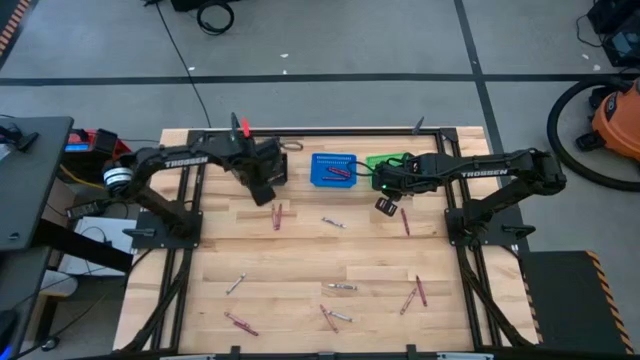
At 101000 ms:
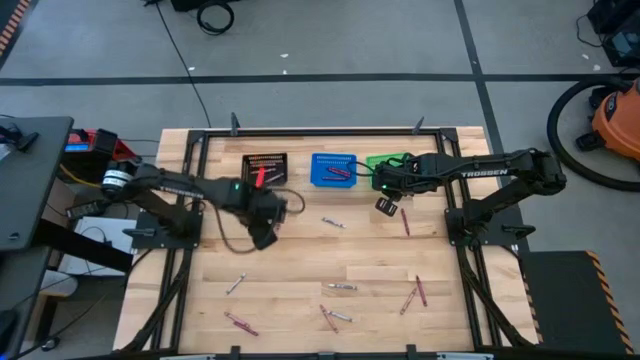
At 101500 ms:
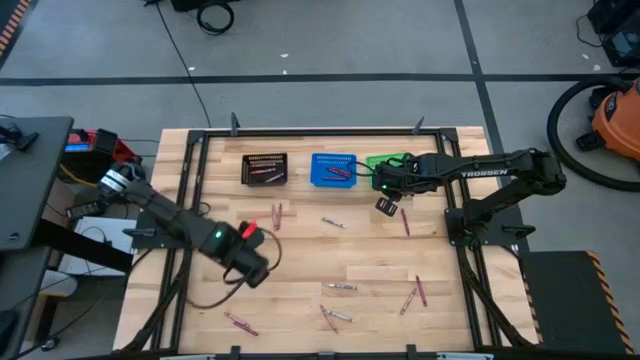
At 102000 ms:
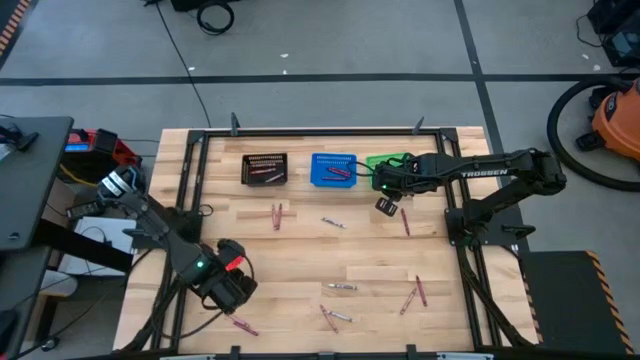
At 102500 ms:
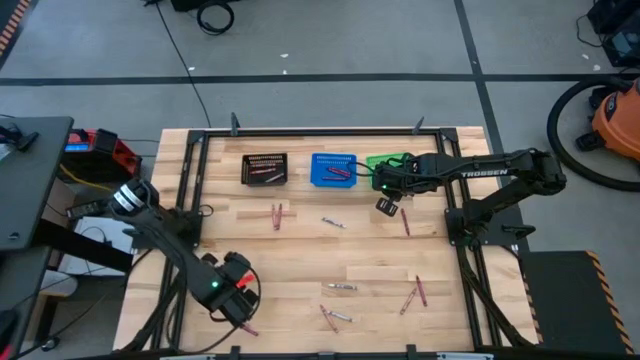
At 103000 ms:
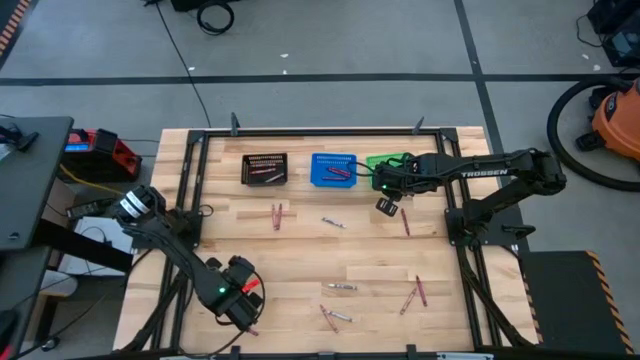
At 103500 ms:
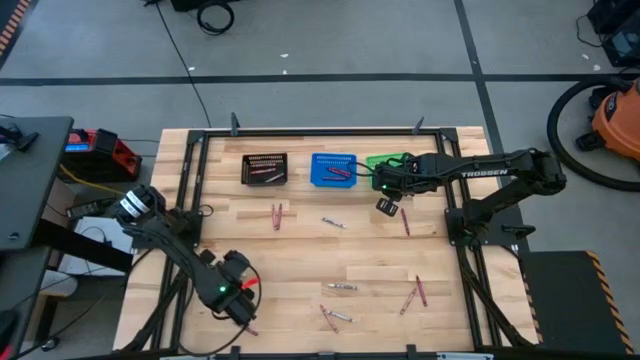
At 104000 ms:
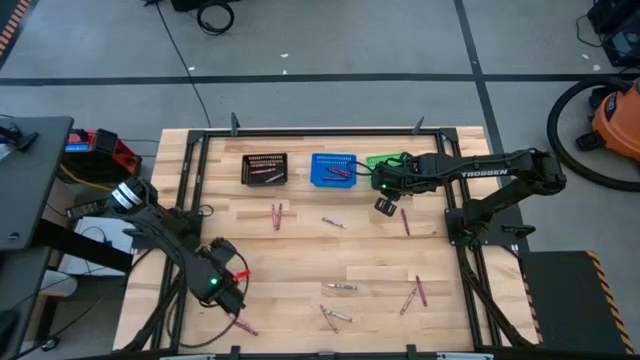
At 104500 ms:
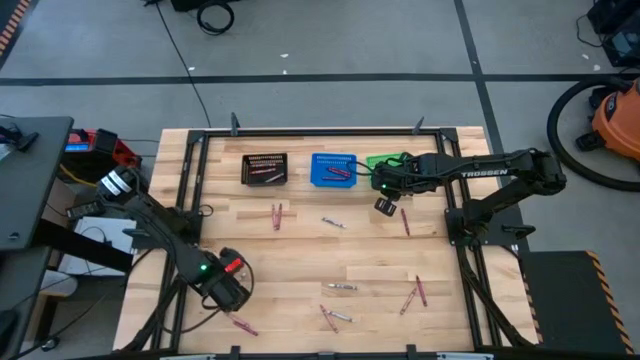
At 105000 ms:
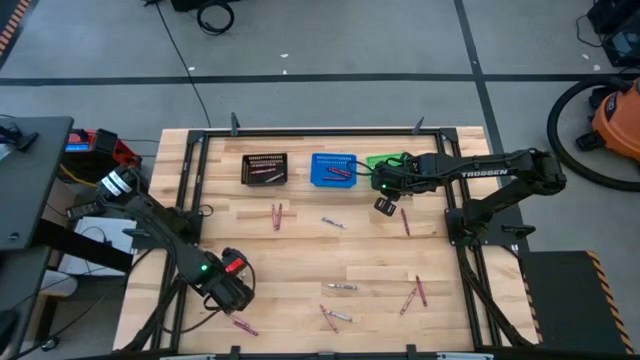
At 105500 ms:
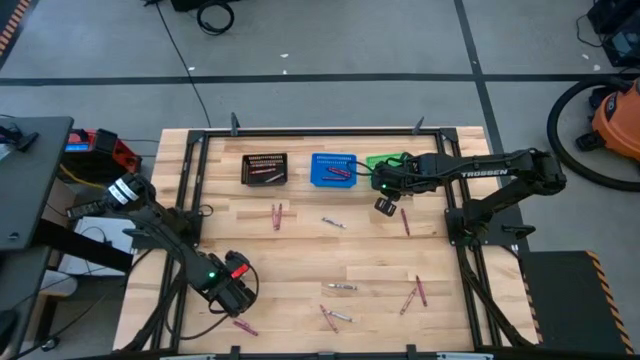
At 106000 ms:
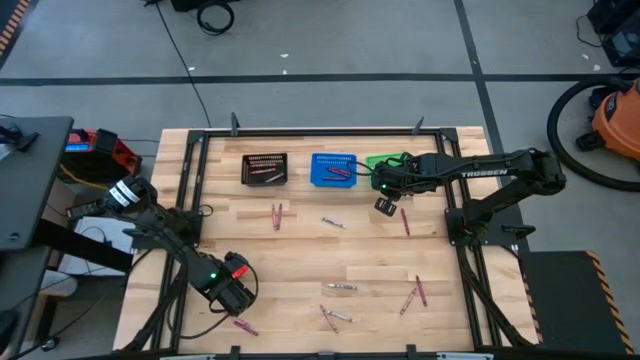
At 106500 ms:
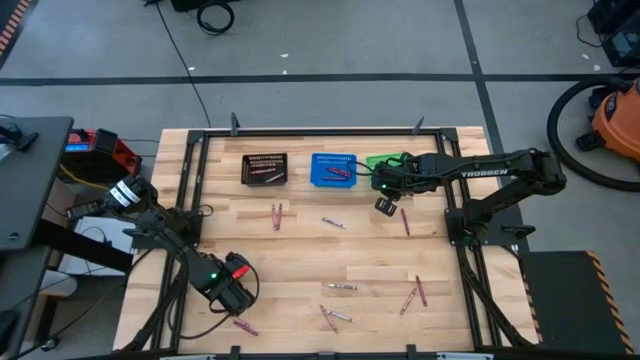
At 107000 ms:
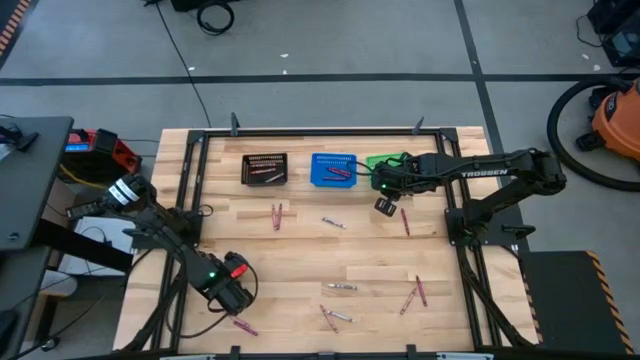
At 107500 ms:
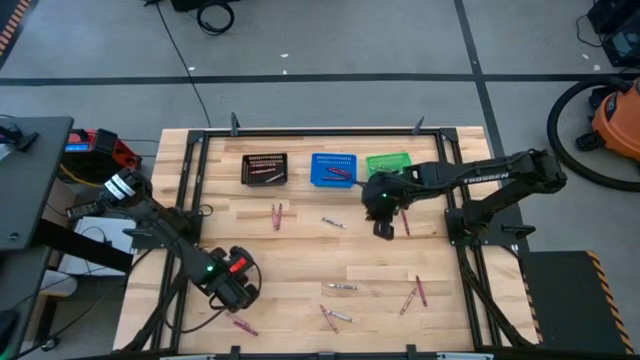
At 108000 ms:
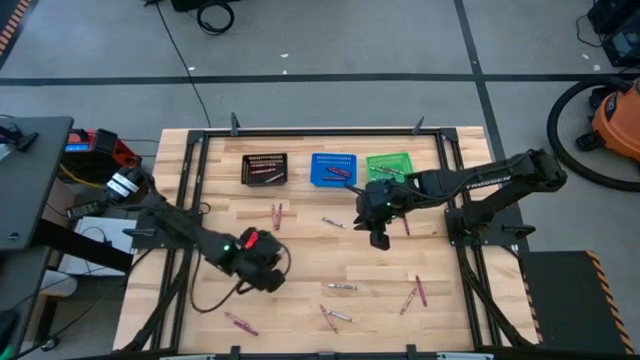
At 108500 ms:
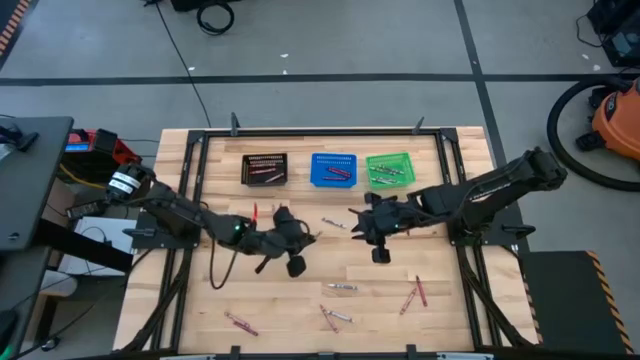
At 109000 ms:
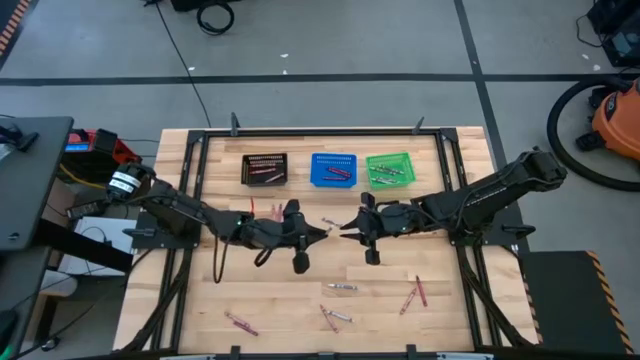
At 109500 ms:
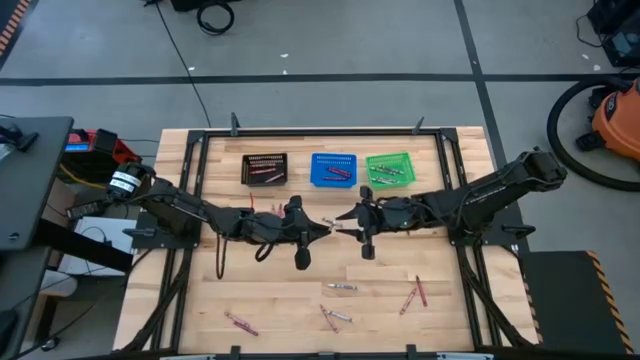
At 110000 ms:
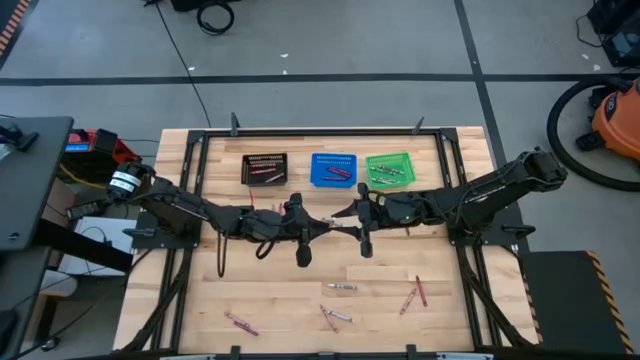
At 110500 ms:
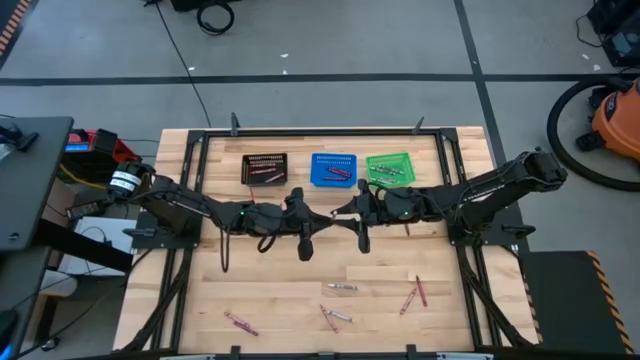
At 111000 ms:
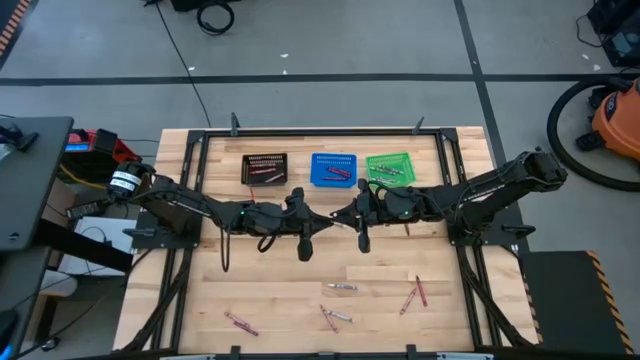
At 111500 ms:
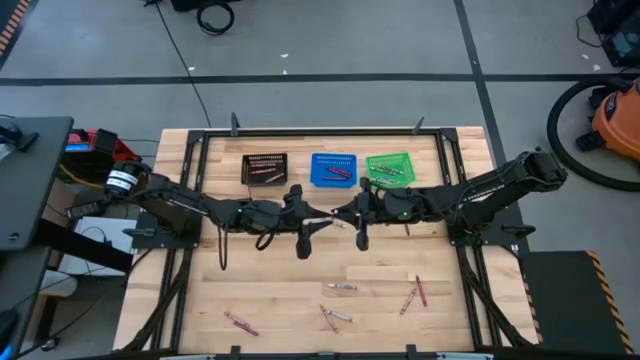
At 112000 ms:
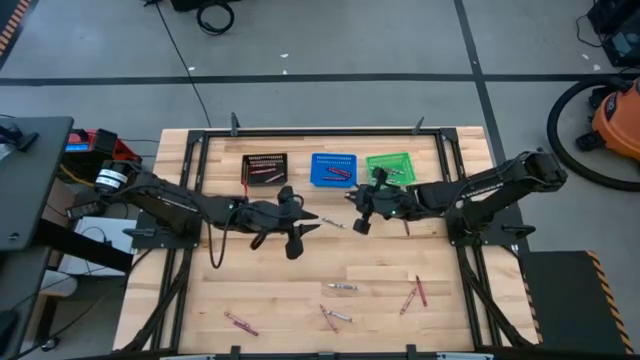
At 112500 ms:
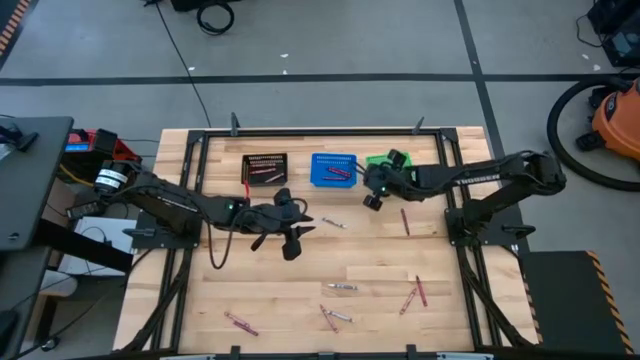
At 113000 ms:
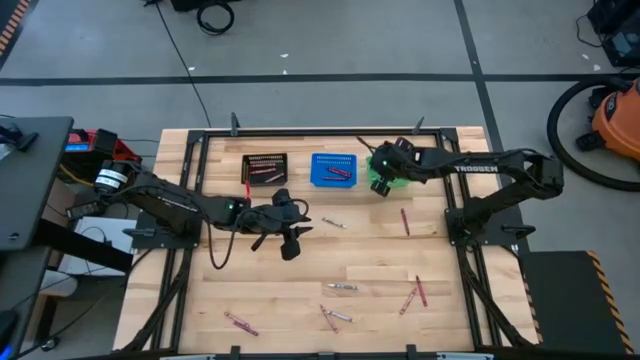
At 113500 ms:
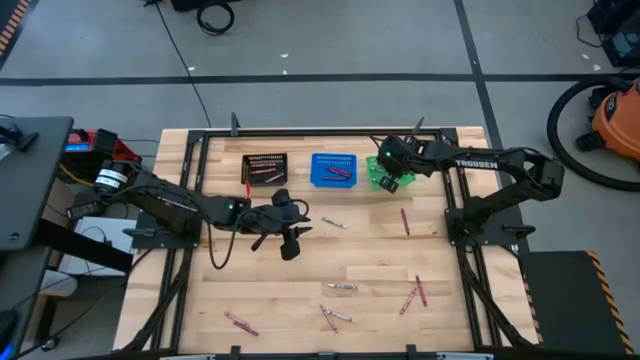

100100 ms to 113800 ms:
Task: Sort crayons
Put the white crayon into the green bin

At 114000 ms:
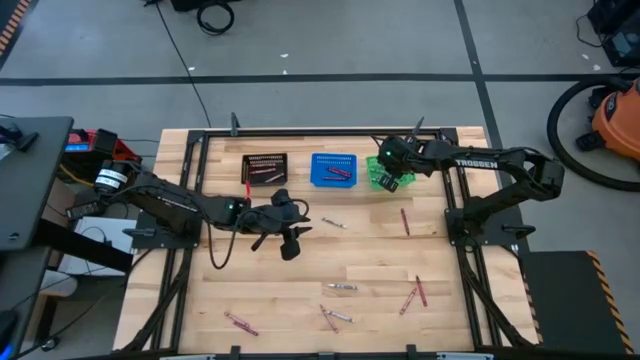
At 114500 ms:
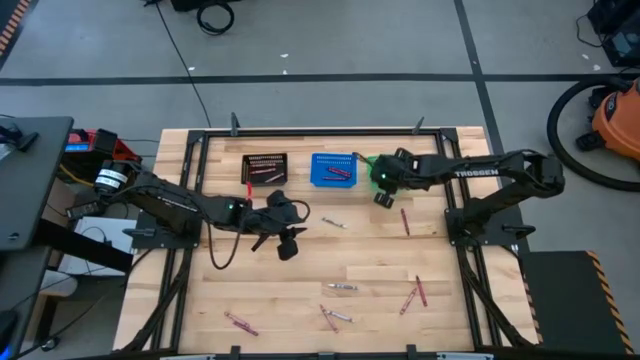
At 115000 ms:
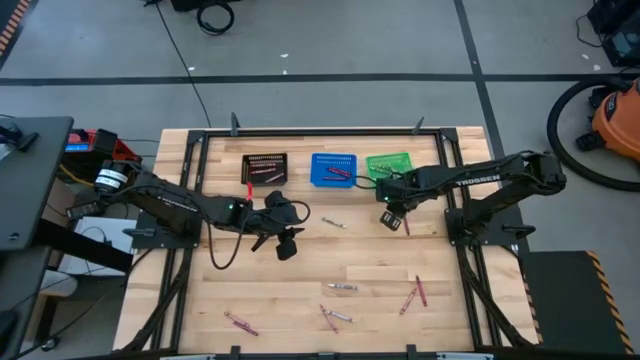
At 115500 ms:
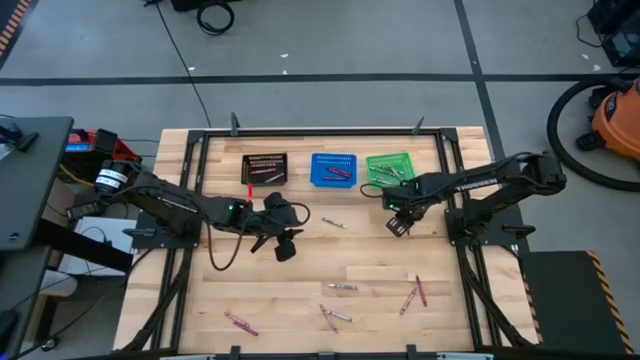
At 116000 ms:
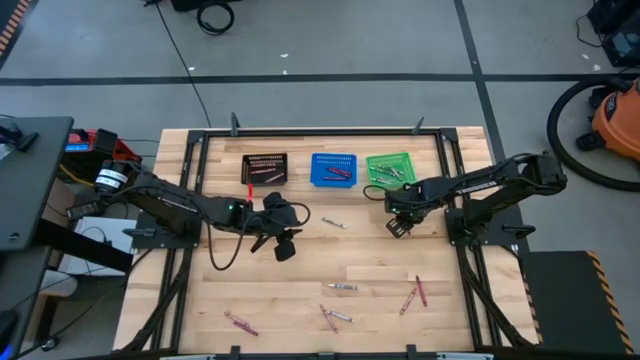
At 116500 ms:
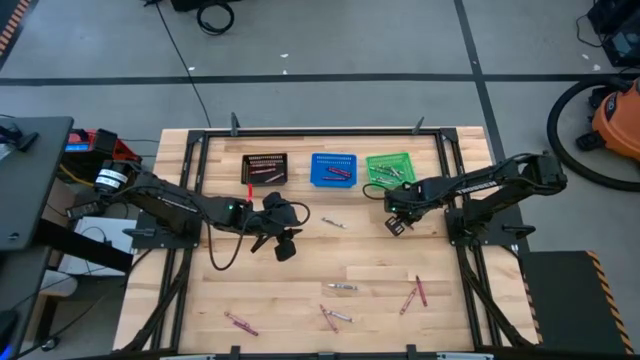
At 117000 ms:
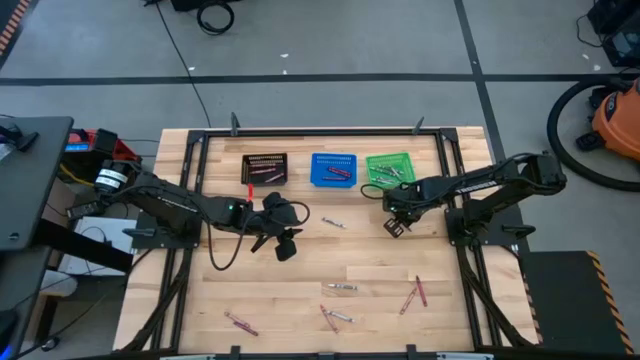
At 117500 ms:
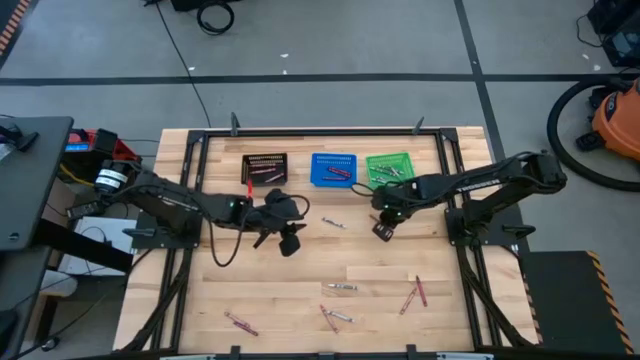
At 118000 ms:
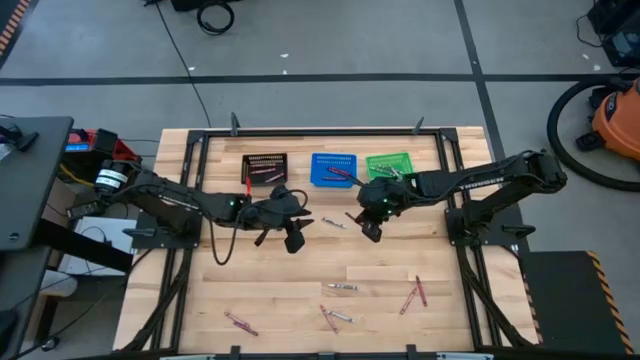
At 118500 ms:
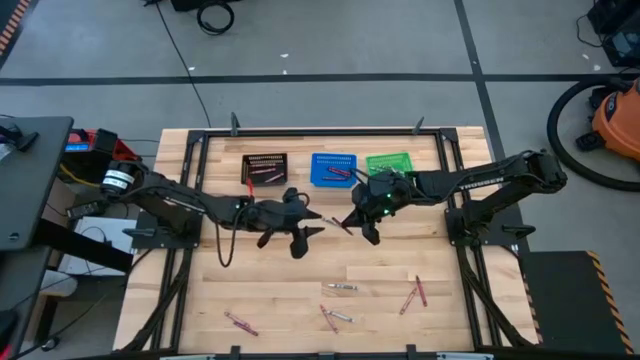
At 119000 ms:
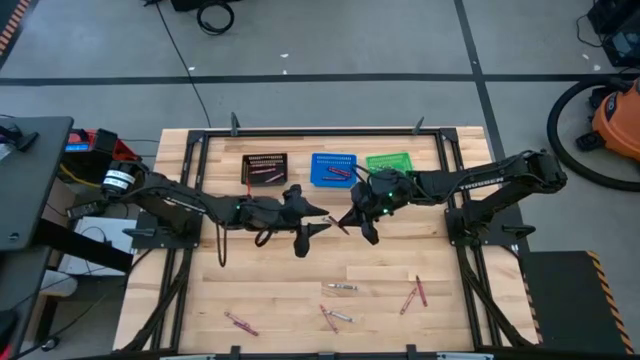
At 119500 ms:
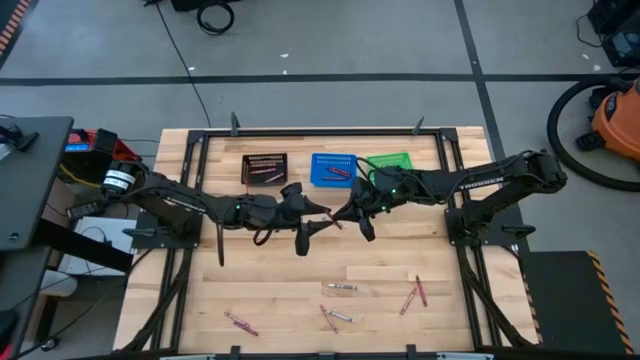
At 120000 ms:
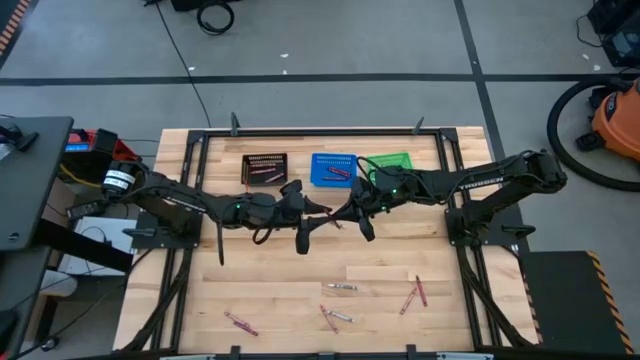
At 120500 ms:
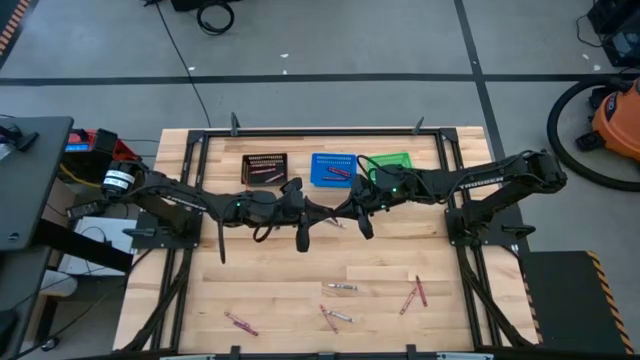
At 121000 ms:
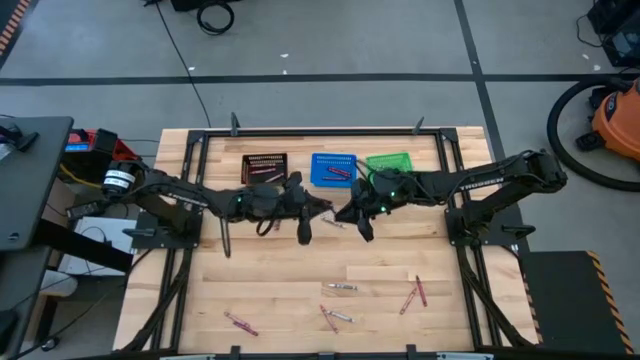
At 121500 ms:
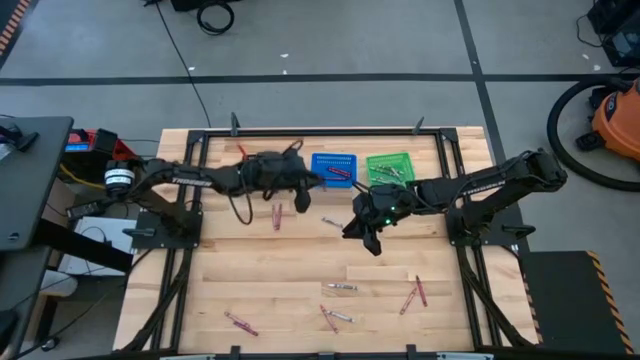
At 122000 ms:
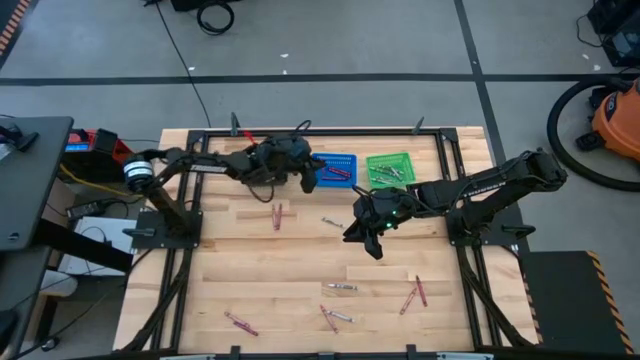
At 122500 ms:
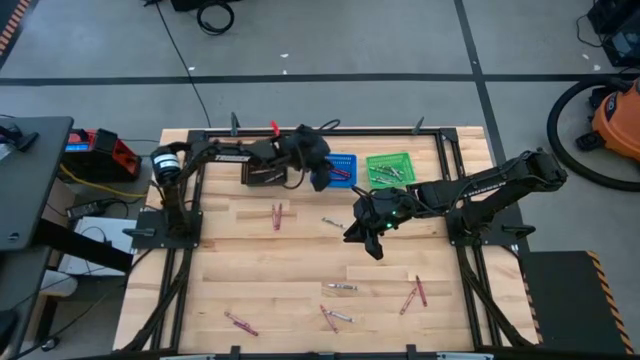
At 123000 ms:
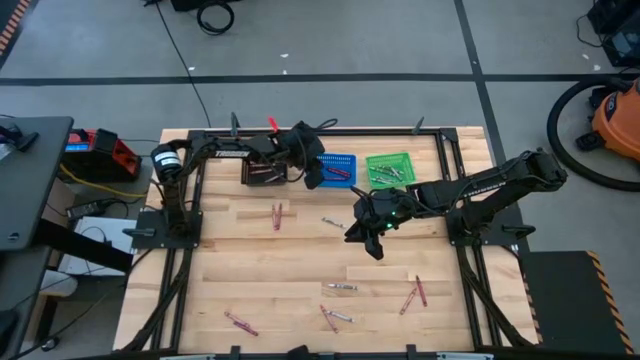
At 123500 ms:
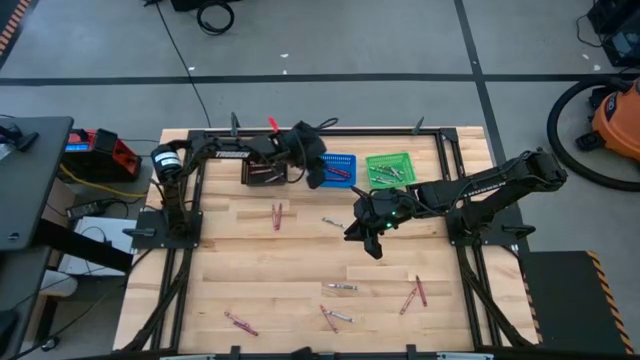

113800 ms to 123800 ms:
Put the red crayon into the blue bin
